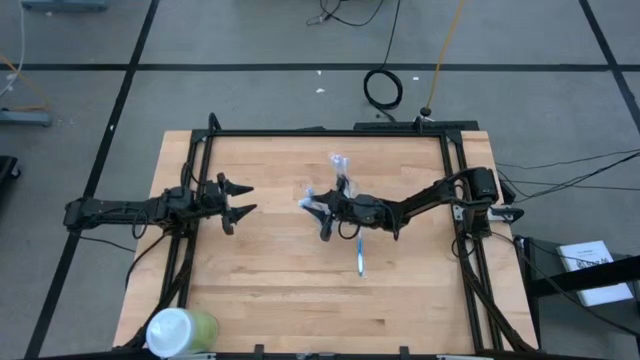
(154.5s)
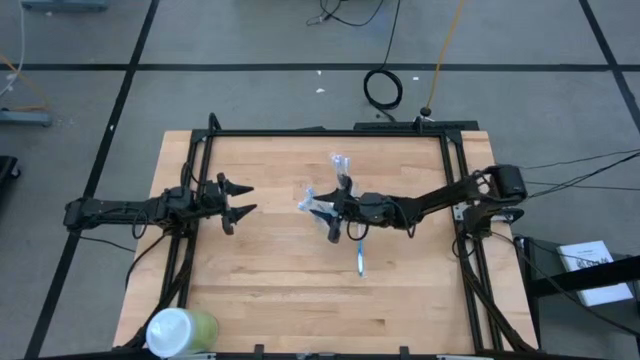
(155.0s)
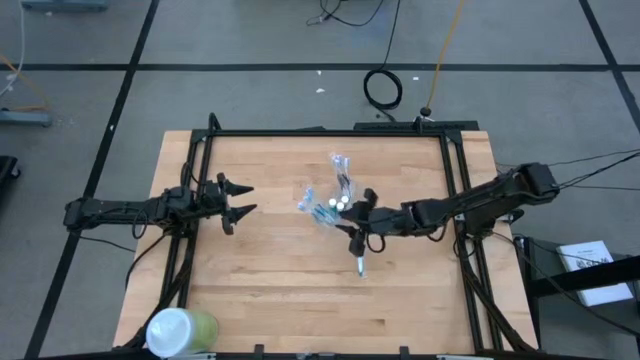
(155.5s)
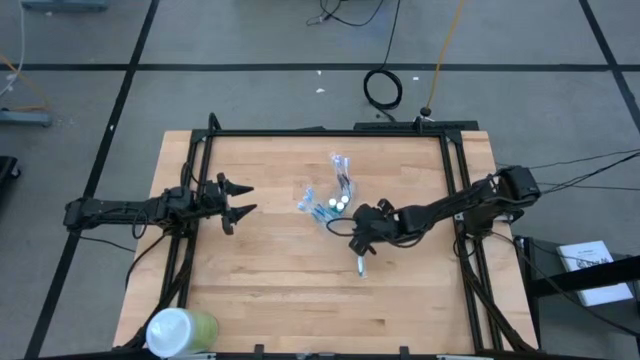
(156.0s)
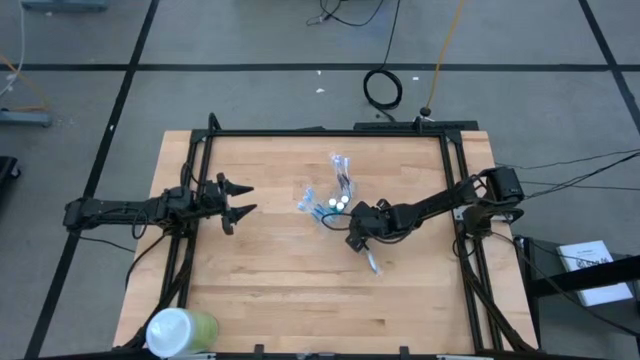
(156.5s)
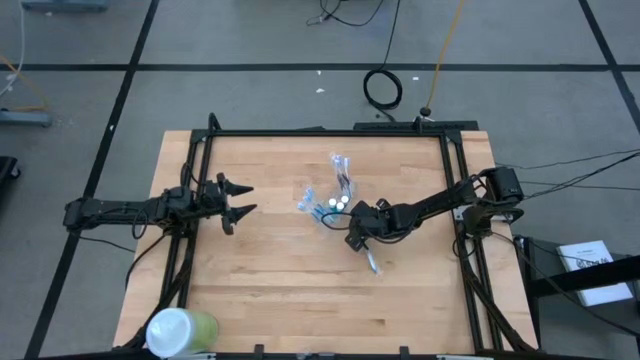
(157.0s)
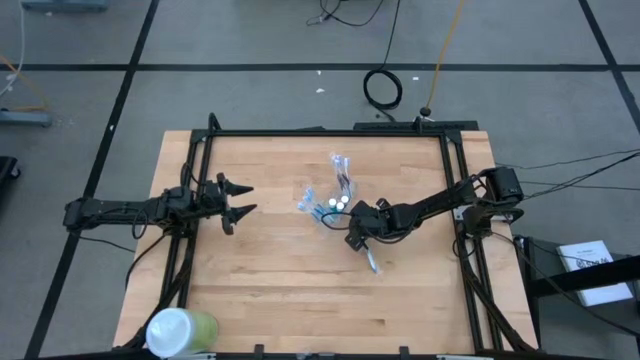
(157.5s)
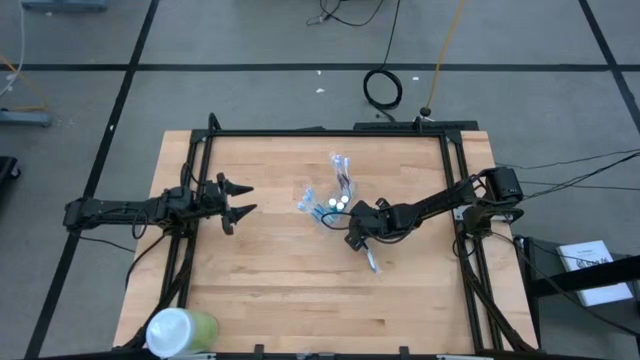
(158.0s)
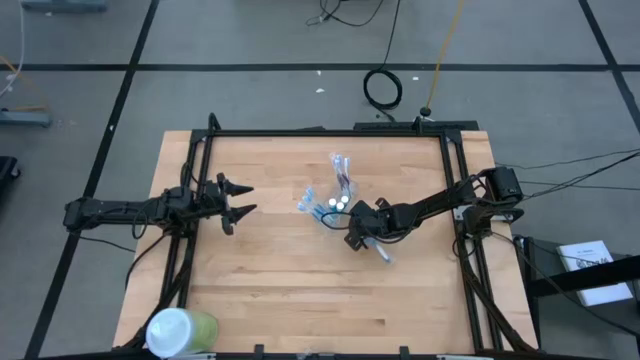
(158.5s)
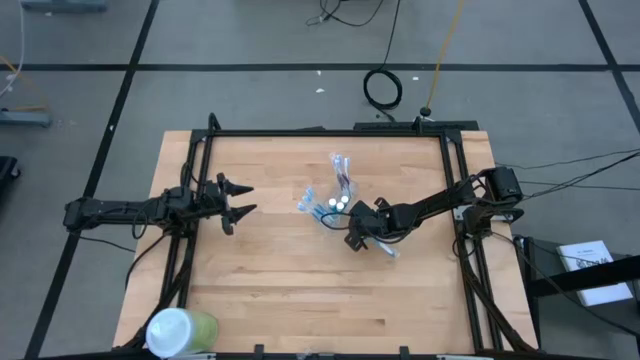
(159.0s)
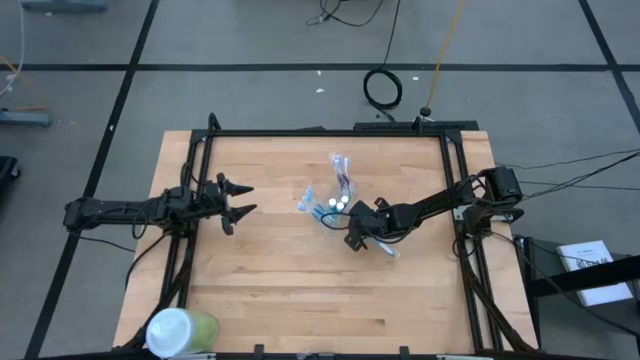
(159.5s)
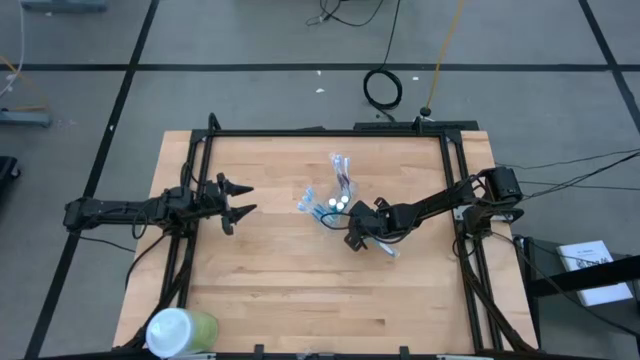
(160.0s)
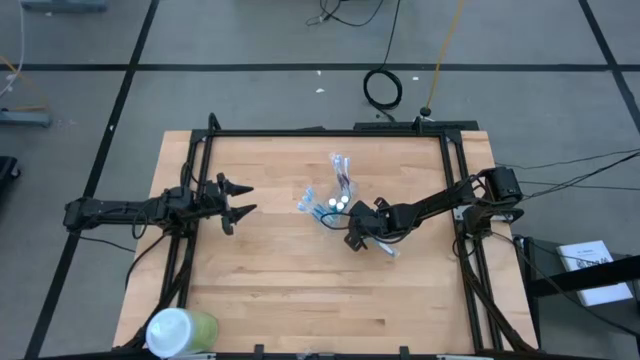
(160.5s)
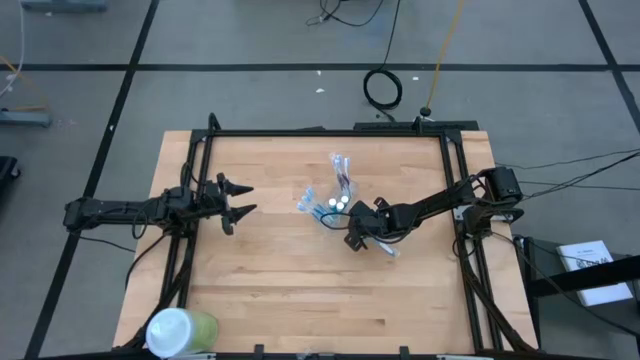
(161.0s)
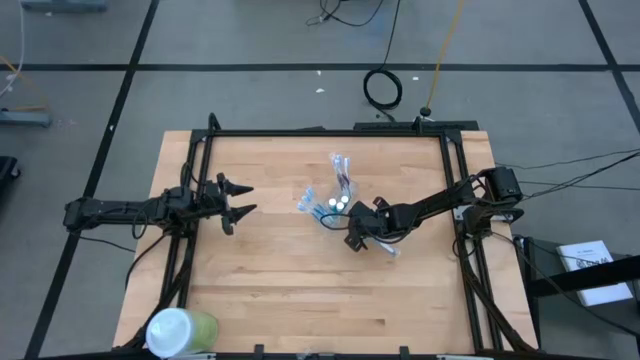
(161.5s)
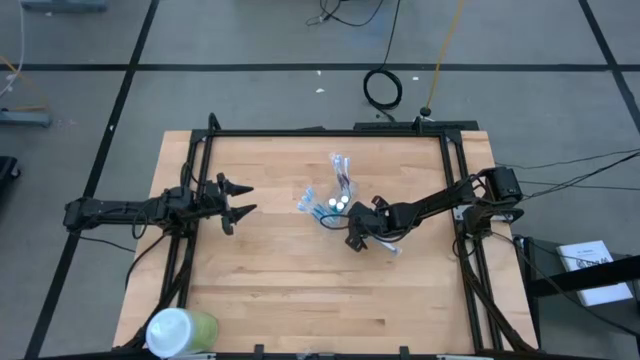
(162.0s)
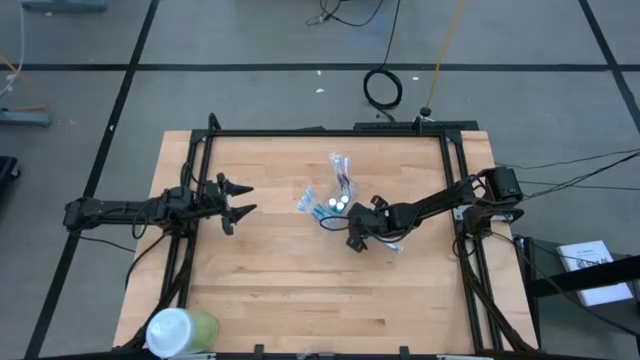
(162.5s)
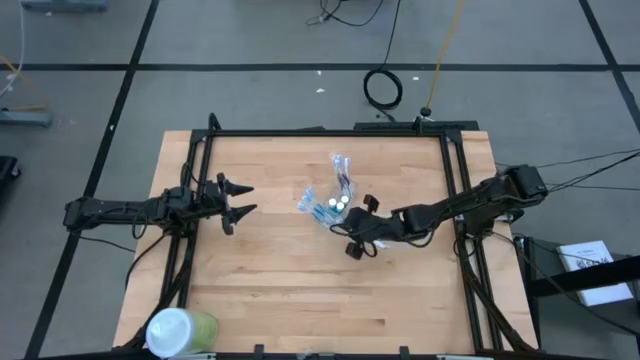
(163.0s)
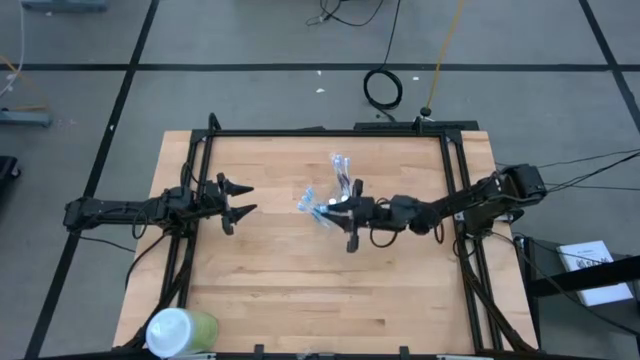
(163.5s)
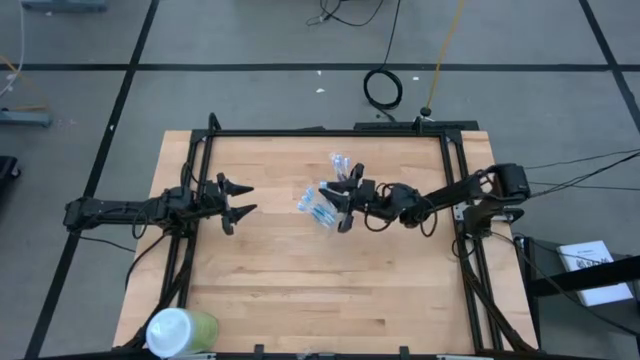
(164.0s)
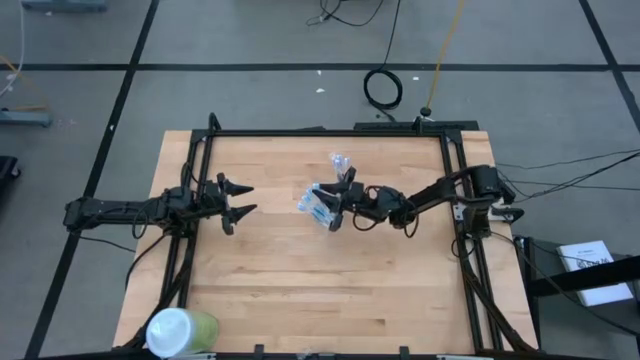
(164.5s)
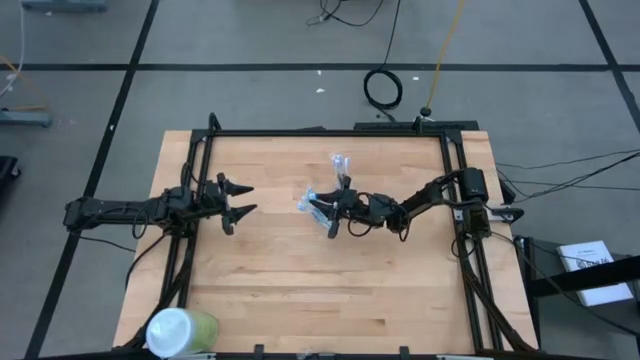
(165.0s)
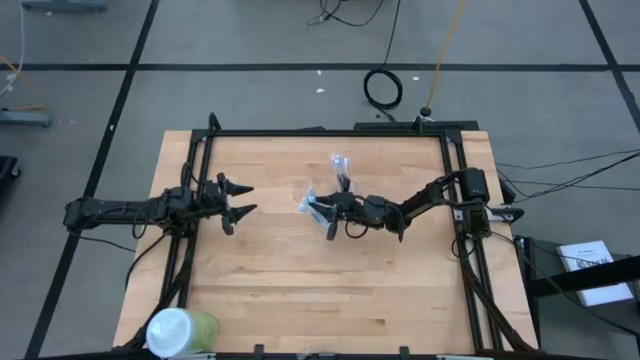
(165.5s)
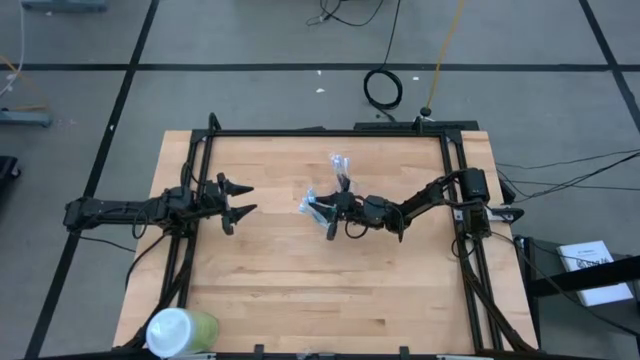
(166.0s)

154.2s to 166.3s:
Task: Pick & Place toothbrushing station
Put the blue toothbrush into the transparent organizer

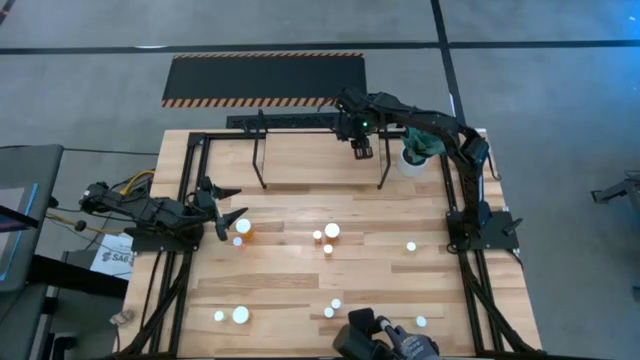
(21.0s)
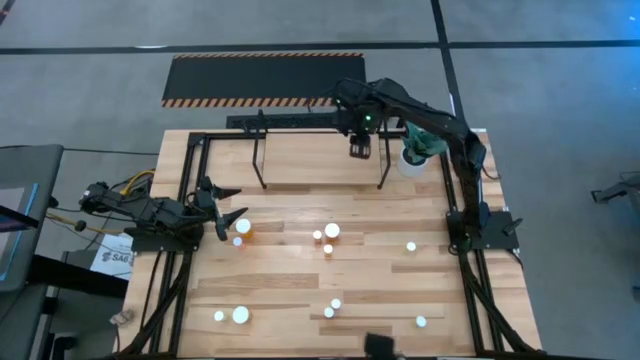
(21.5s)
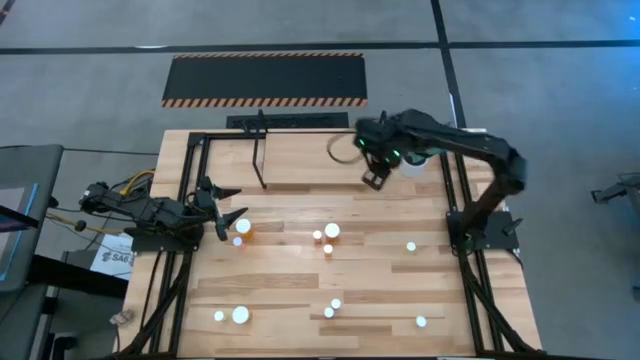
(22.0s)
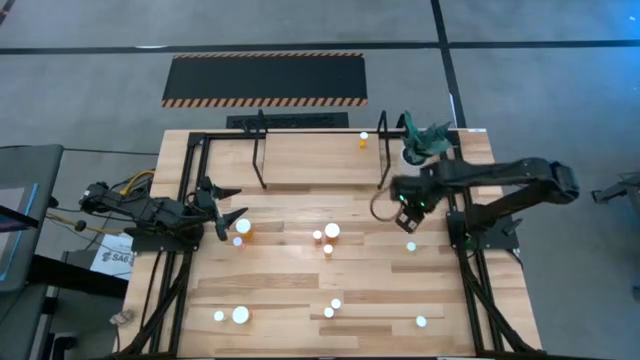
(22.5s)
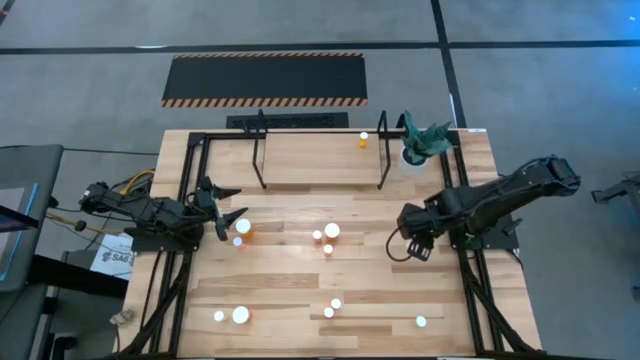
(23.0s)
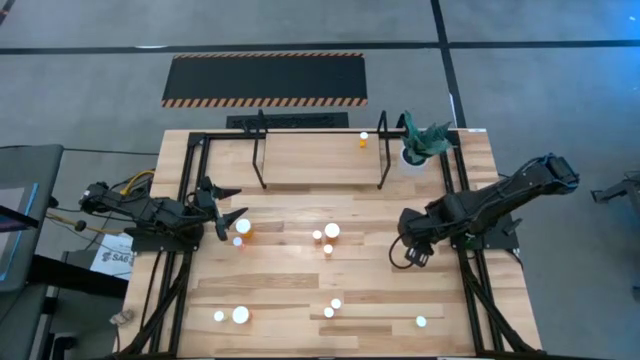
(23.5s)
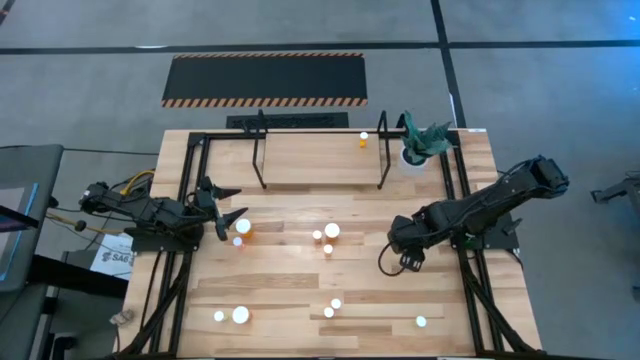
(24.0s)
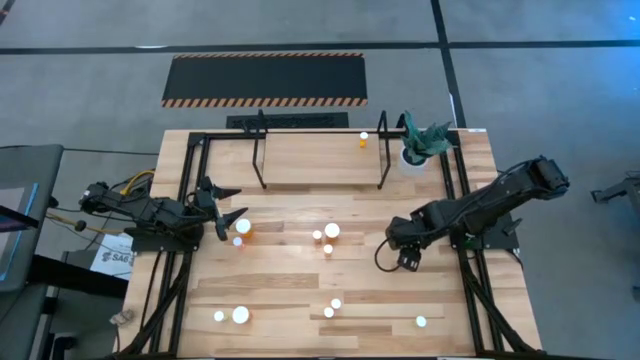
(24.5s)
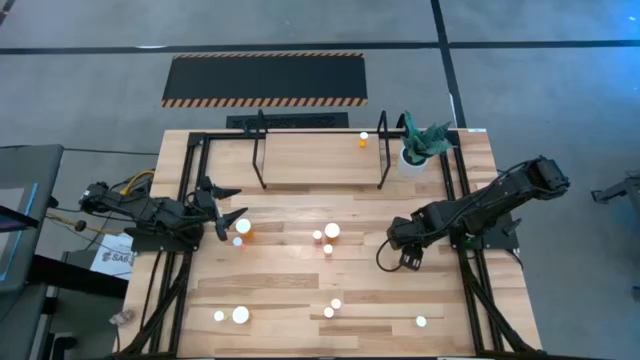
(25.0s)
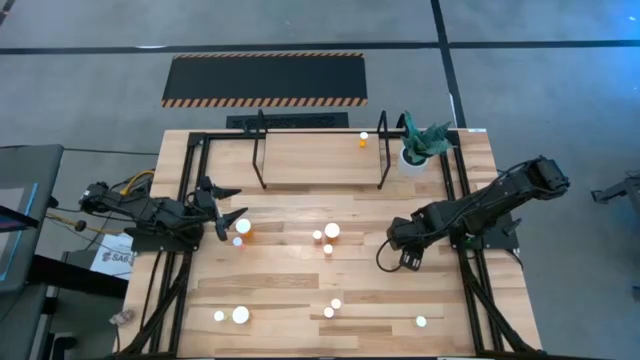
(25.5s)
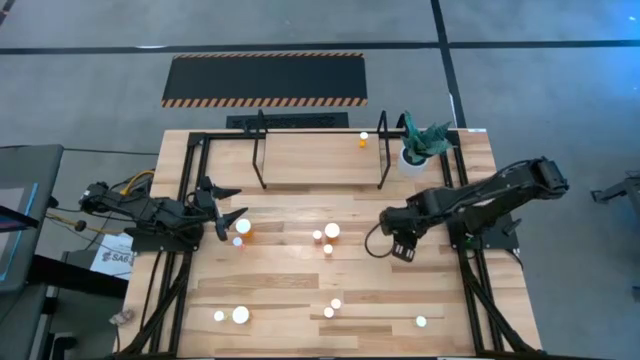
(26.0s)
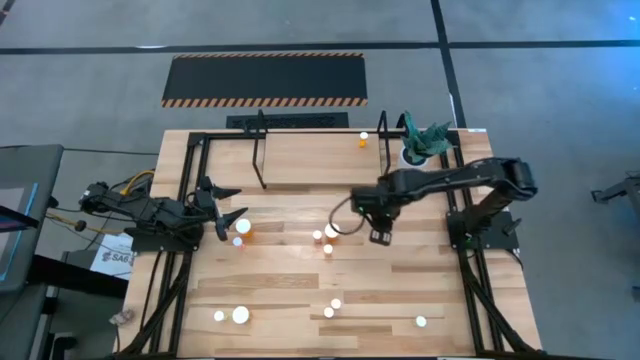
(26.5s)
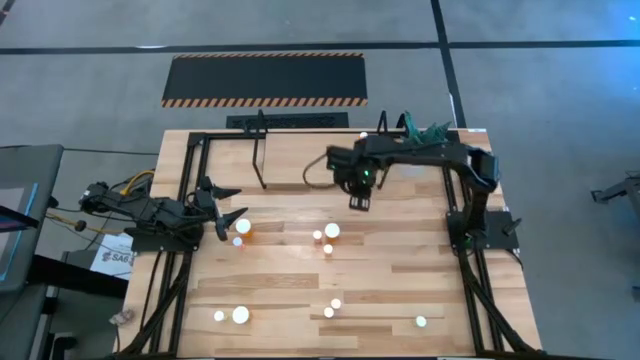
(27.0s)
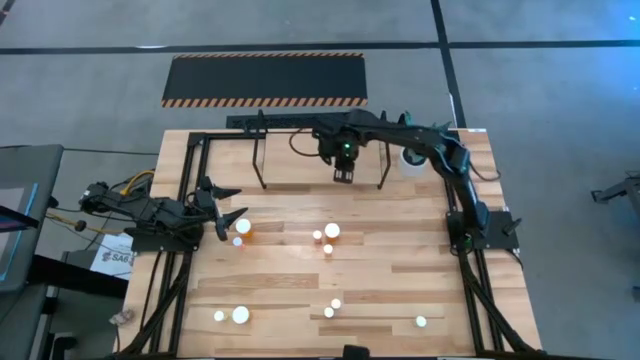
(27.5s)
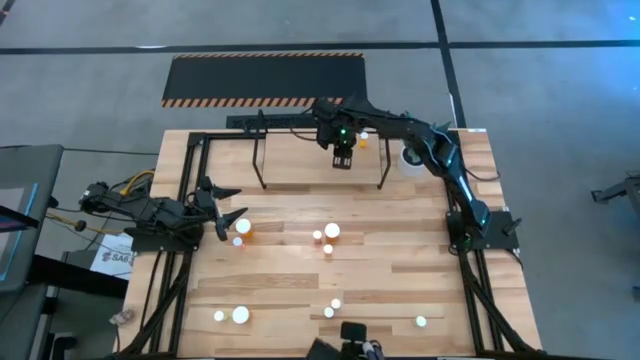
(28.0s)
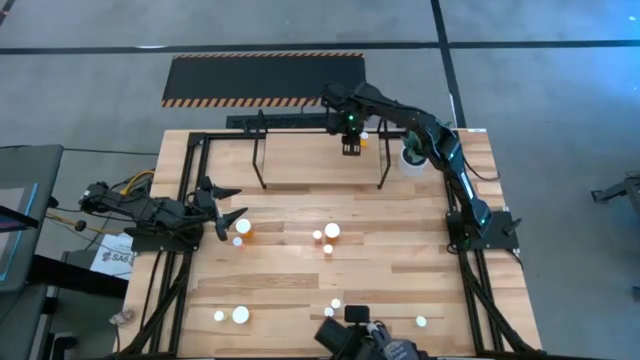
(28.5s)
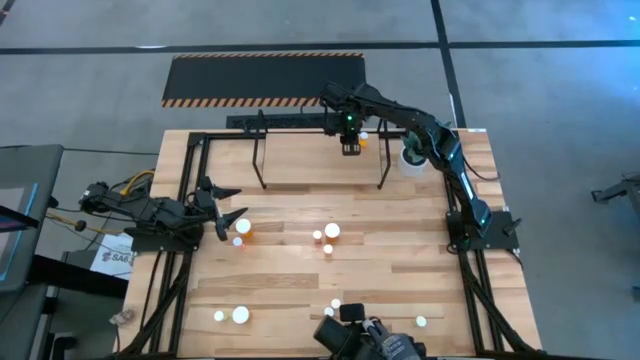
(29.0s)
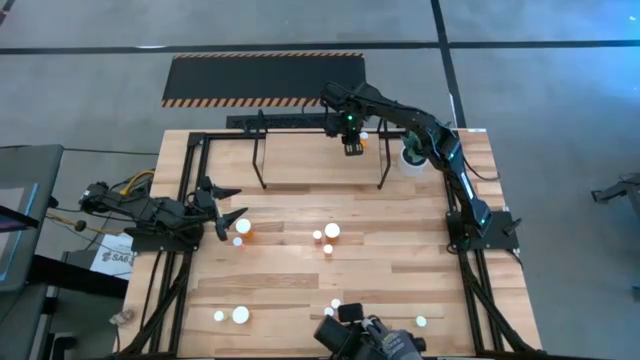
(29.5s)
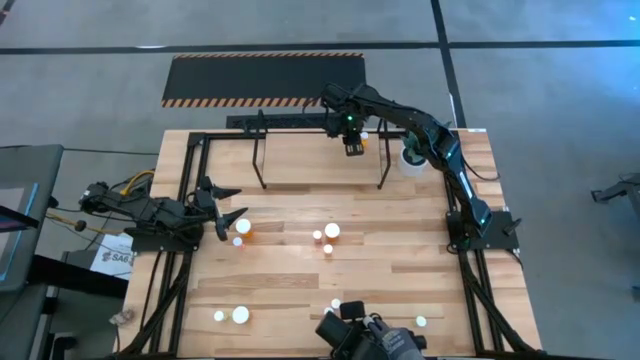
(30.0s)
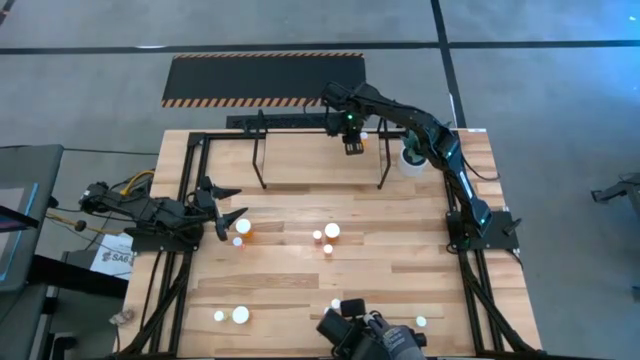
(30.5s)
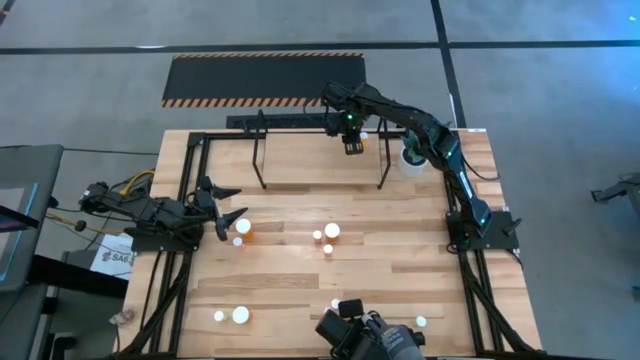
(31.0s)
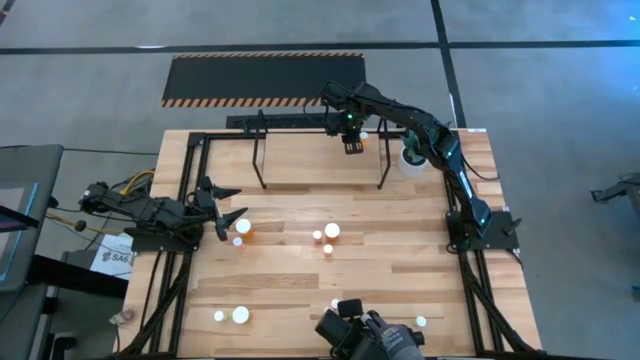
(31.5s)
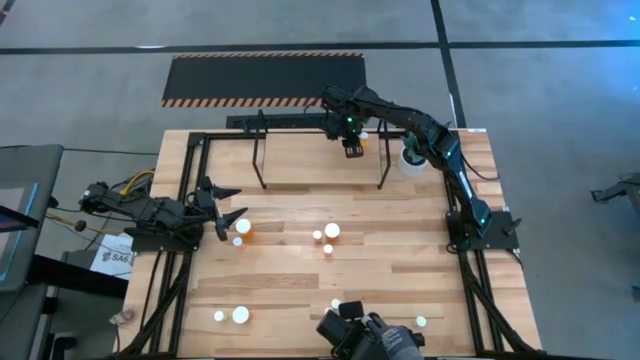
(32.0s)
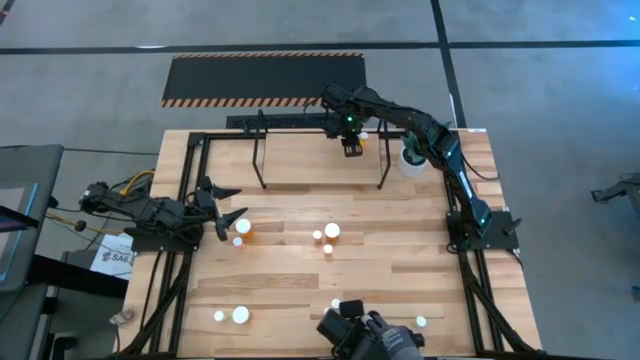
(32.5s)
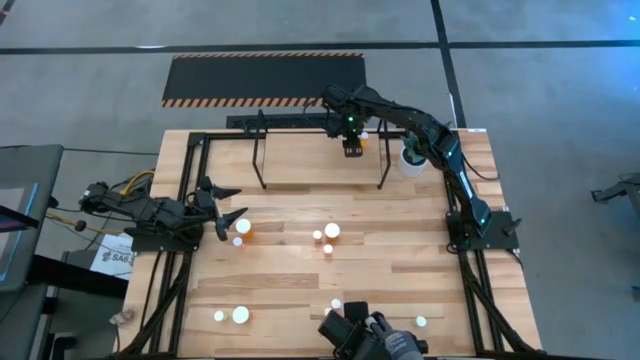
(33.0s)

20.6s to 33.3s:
Task: Pick and place medicine bottles onto shelf by color
Put the top yellow pill bottle on the shelf
